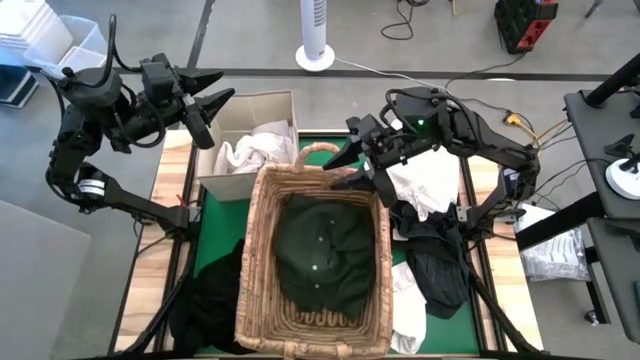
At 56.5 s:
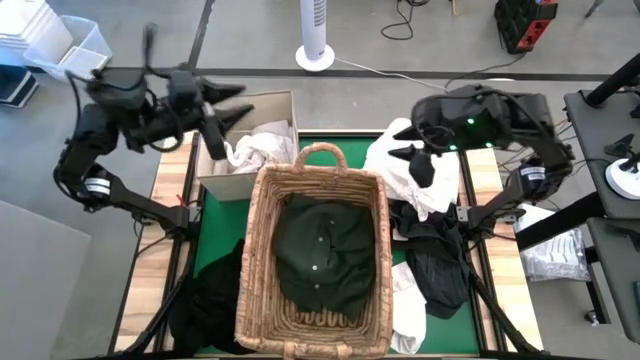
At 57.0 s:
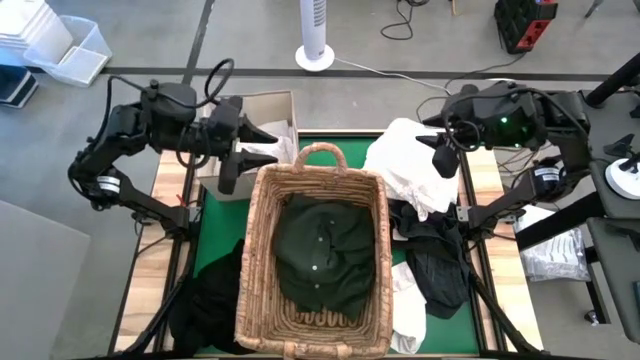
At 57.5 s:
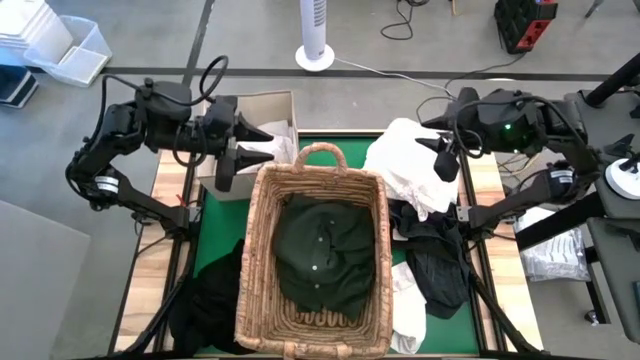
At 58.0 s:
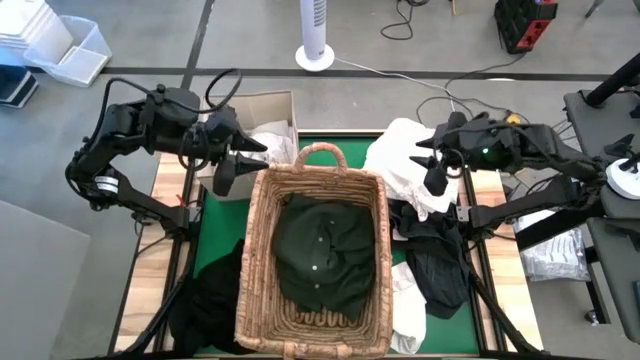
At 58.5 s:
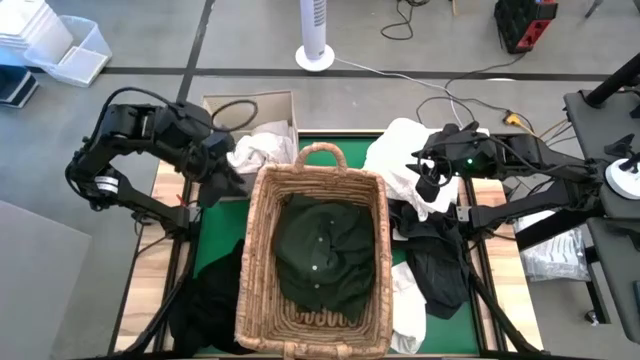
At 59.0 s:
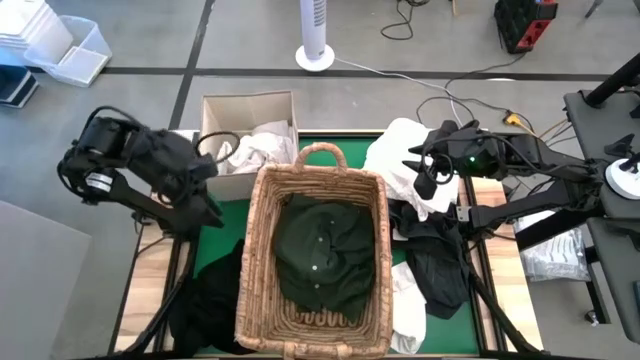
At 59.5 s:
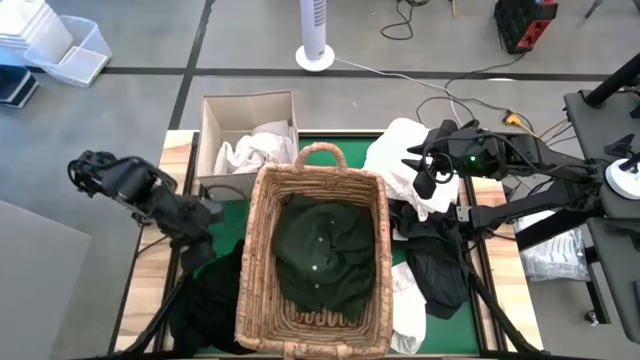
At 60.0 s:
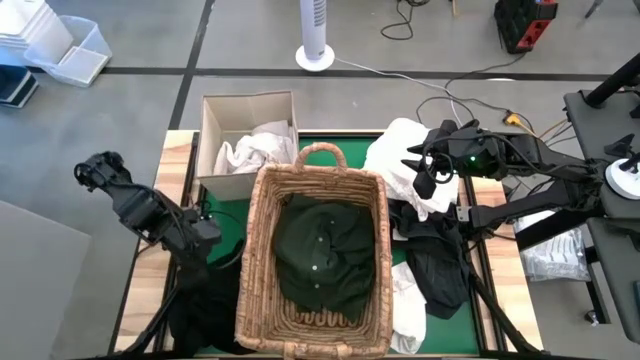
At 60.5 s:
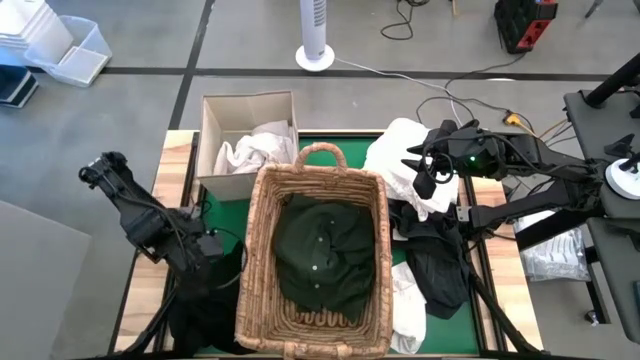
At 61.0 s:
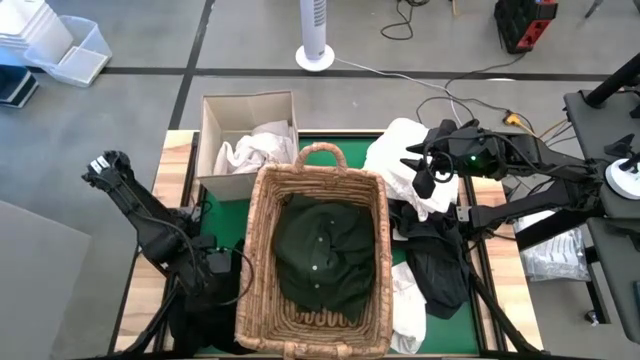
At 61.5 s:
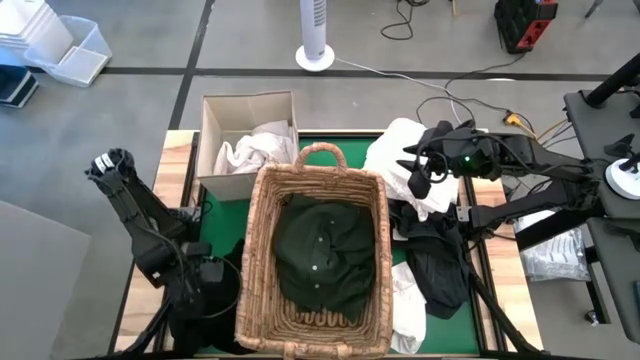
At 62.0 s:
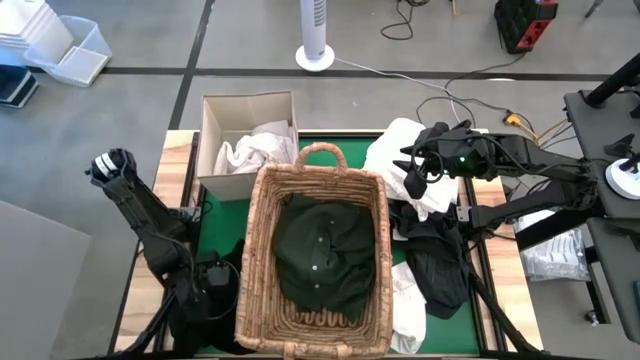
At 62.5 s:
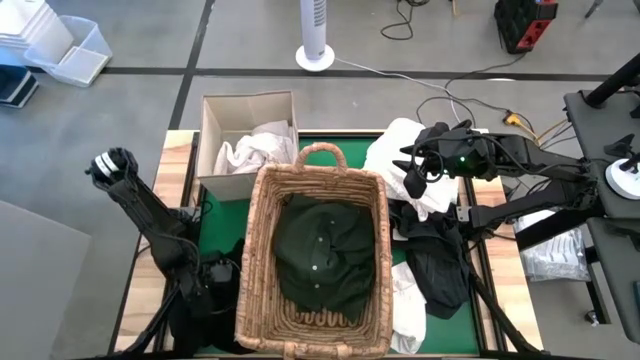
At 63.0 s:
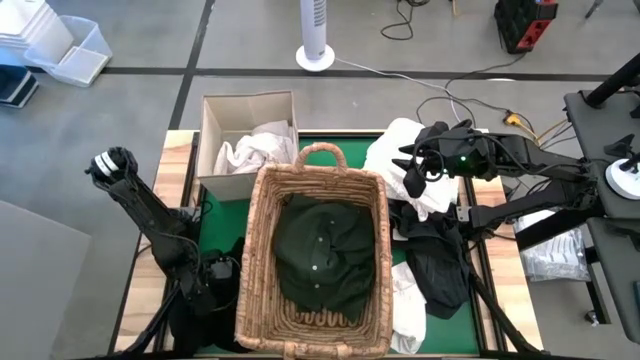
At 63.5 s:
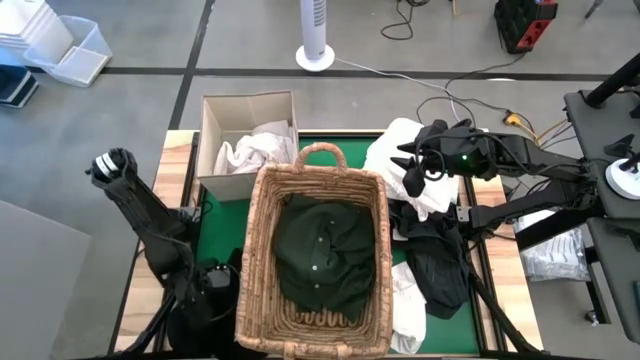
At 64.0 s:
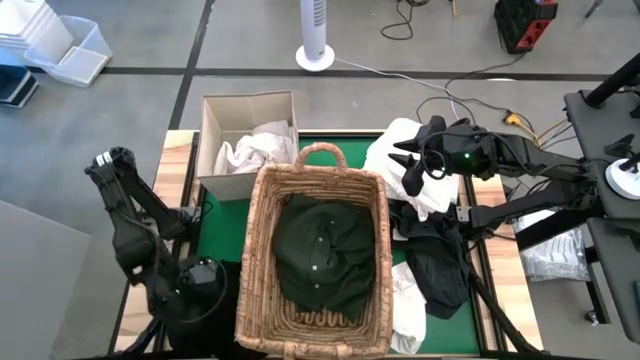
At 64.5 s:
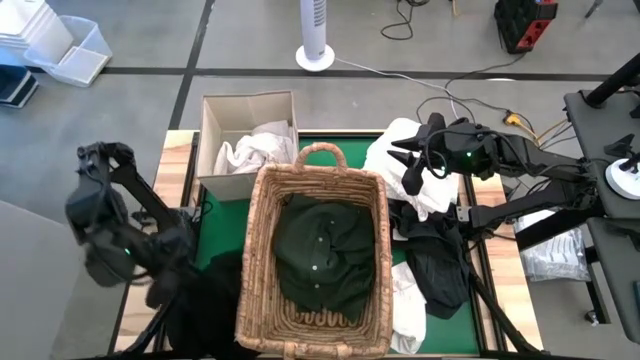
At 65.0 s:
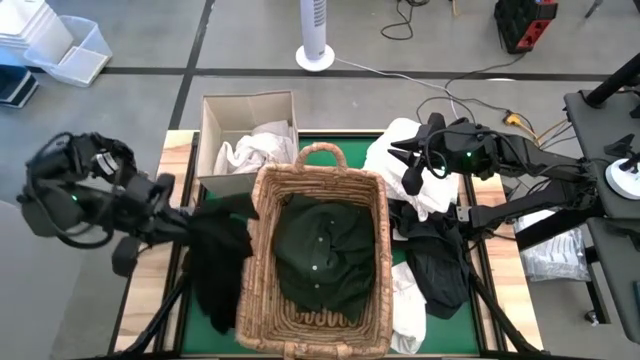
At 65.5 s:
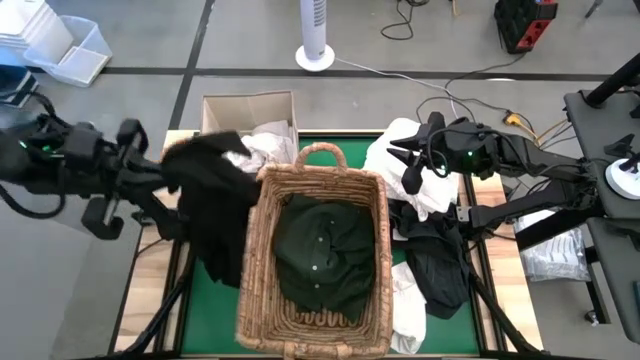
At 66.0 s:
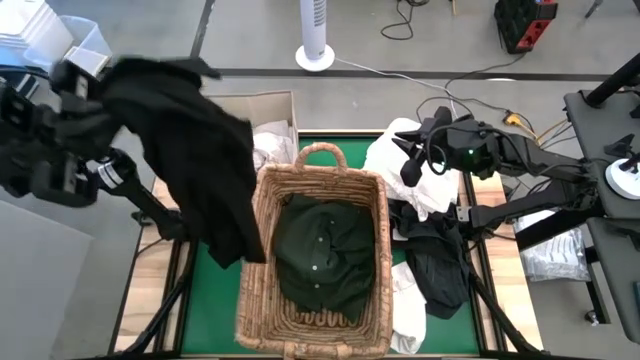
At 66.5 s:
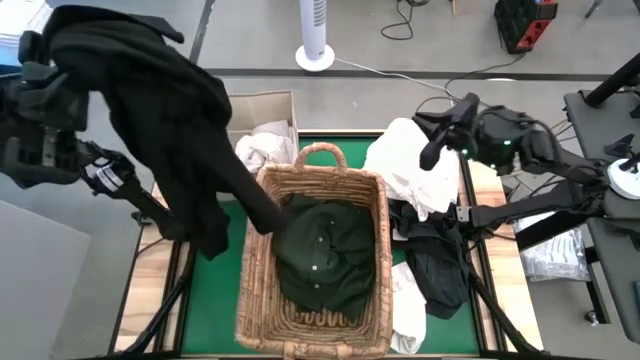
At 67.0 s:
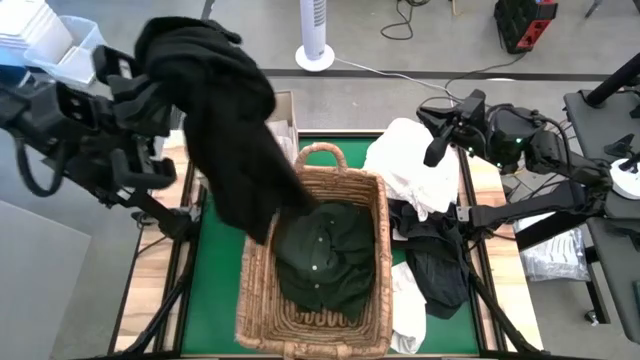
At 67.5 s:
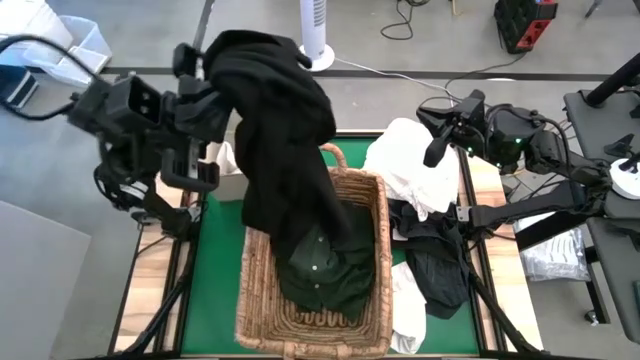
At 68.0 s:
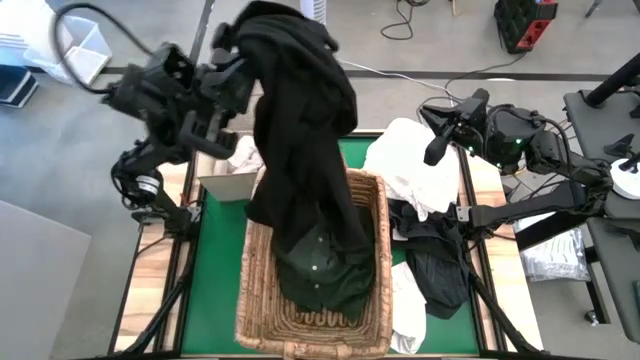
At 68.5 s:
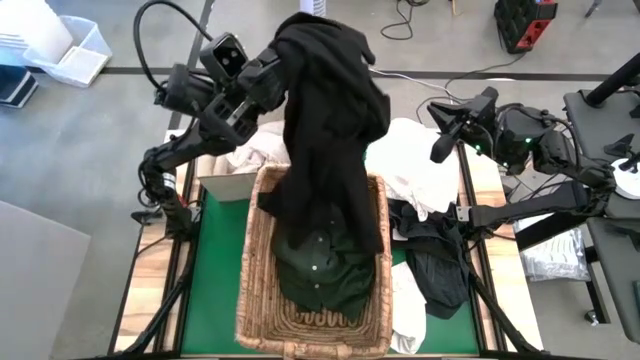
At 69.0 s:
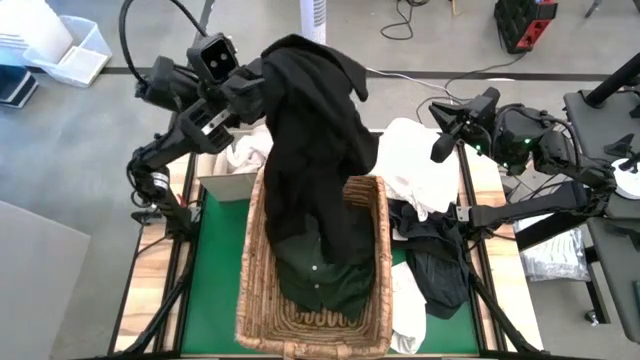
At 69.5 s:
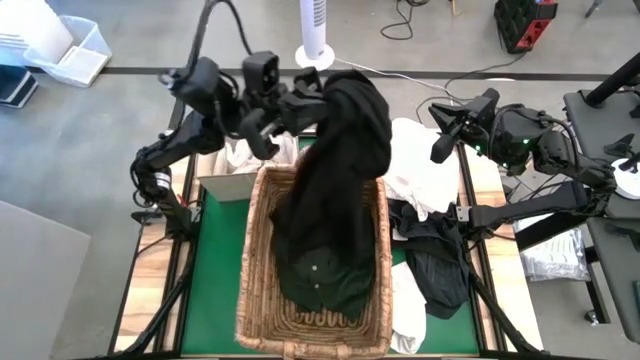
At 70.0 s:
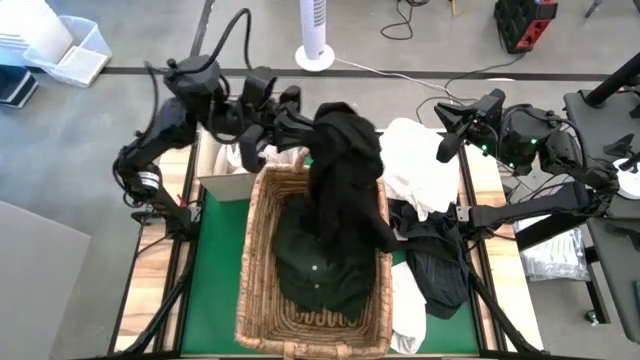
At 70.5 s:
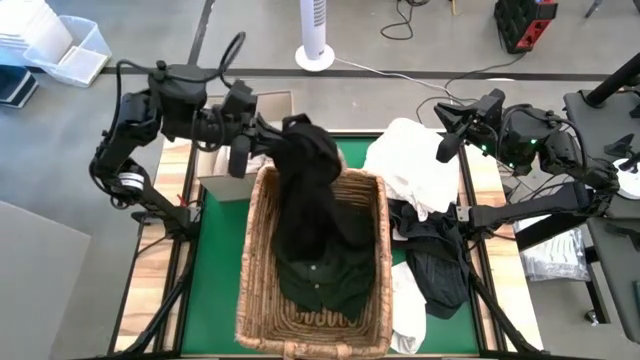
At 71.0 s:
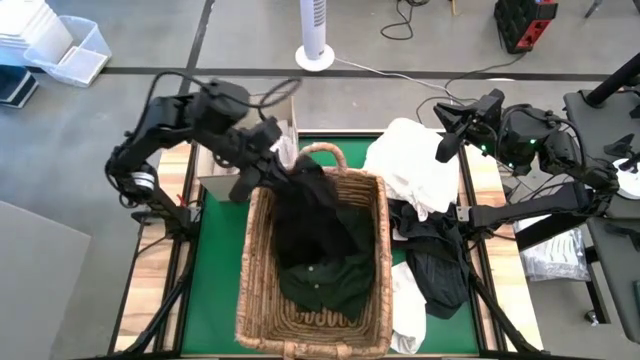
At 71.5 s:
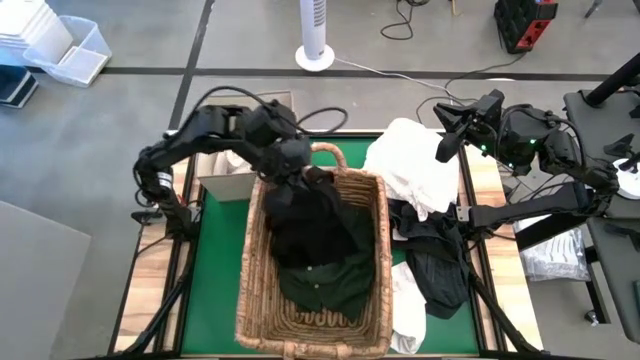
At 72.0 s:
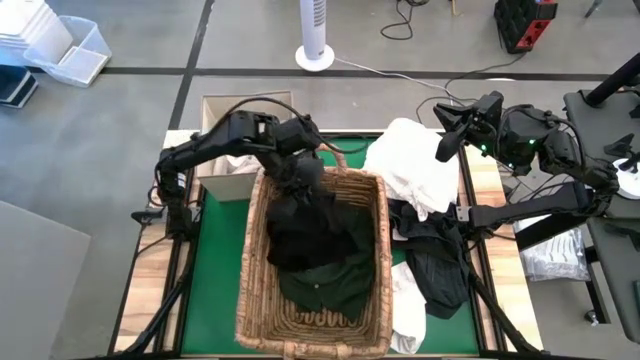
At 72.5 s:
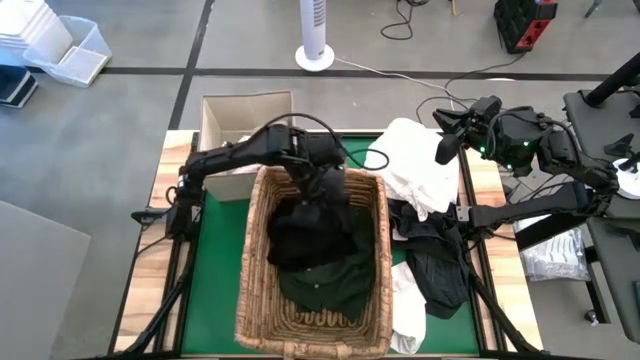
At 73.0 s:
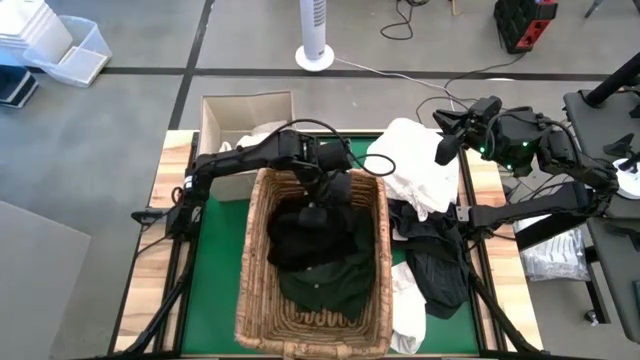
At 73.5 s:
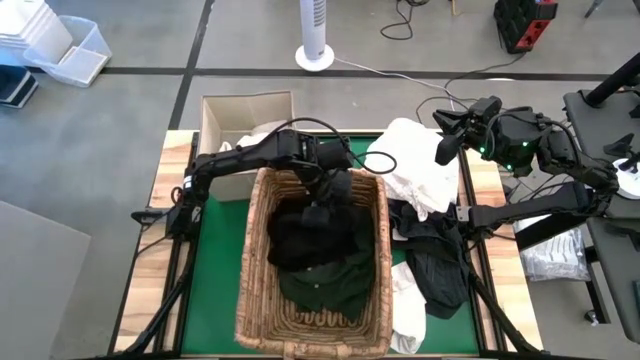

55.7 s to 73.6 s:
Put the black shirt into the brown basket
